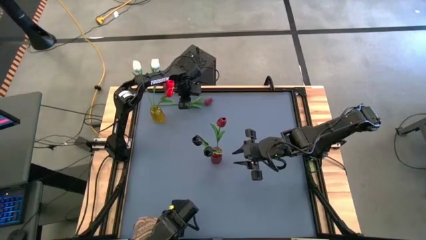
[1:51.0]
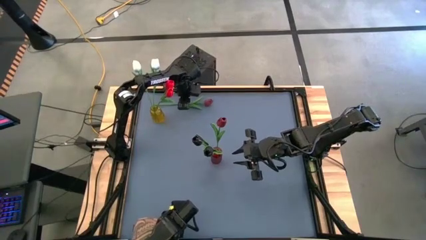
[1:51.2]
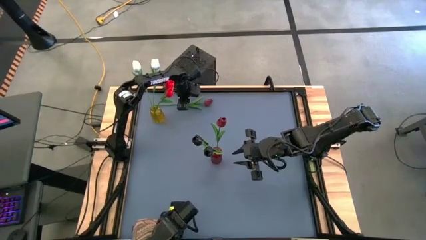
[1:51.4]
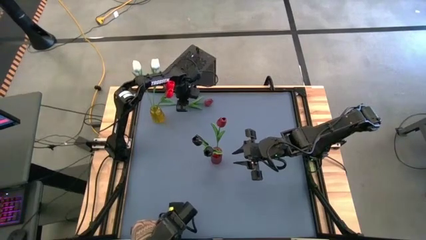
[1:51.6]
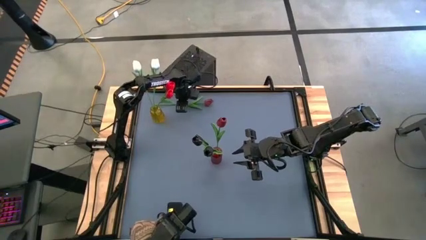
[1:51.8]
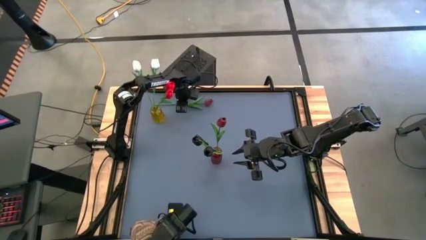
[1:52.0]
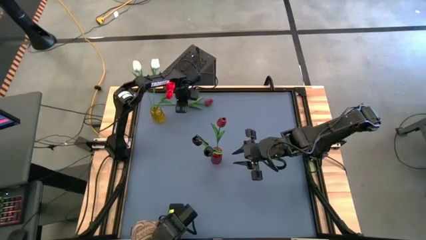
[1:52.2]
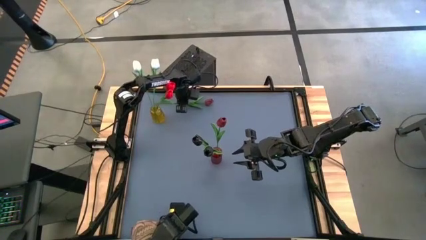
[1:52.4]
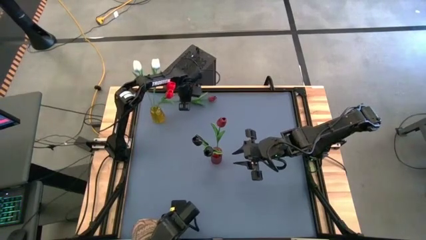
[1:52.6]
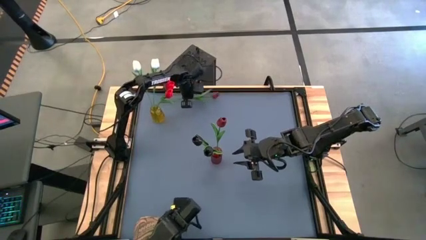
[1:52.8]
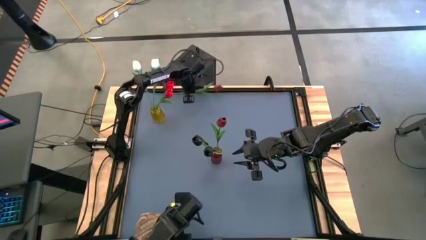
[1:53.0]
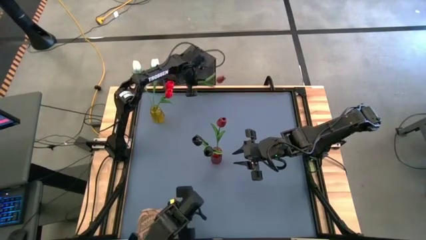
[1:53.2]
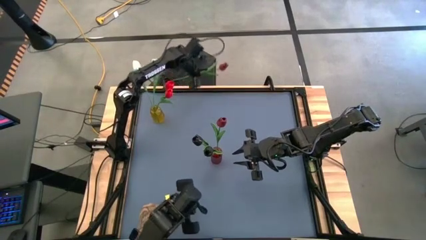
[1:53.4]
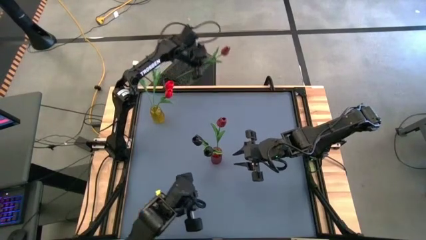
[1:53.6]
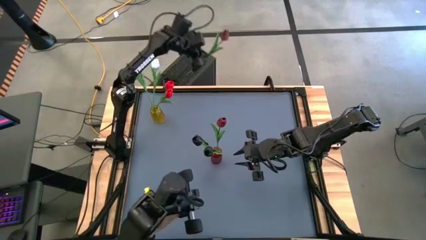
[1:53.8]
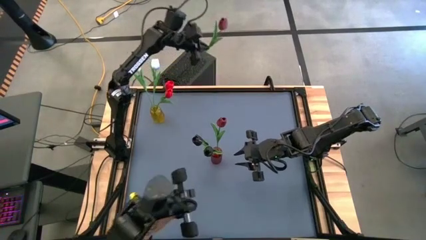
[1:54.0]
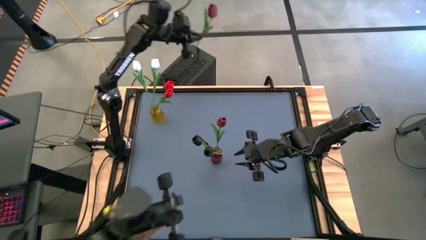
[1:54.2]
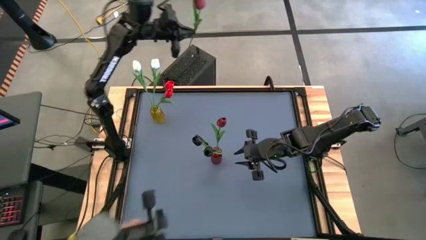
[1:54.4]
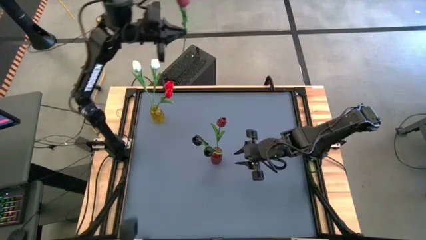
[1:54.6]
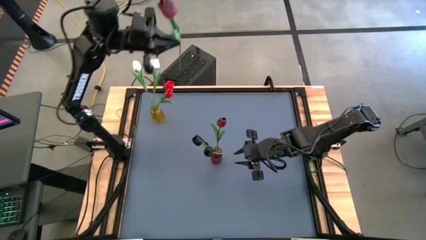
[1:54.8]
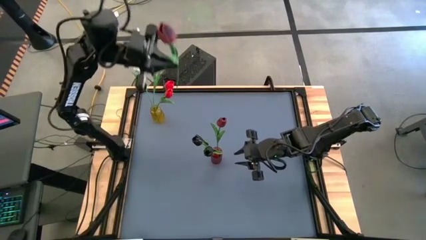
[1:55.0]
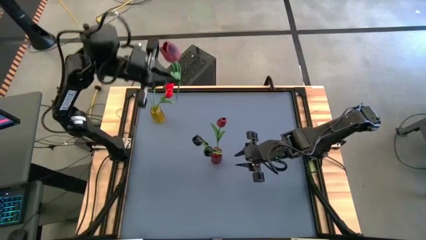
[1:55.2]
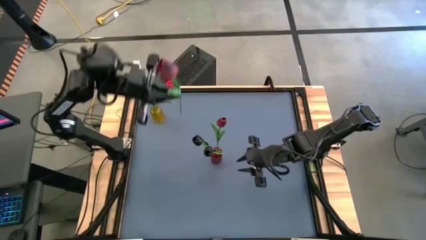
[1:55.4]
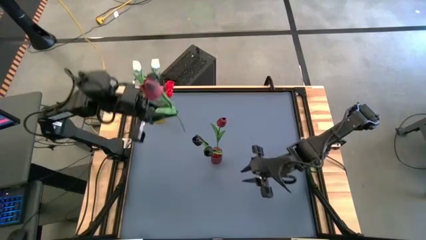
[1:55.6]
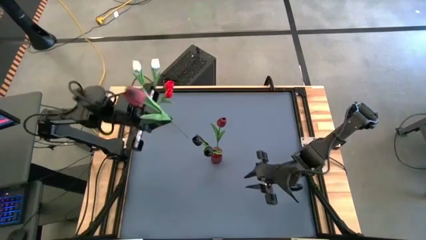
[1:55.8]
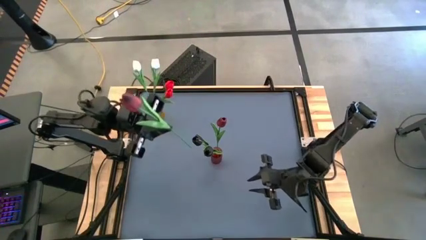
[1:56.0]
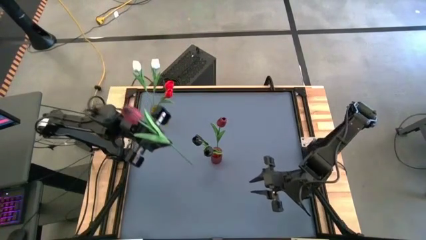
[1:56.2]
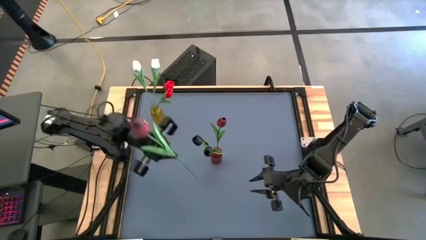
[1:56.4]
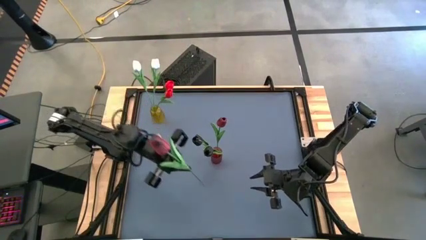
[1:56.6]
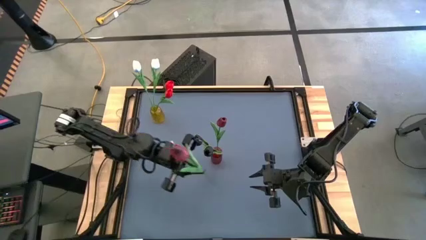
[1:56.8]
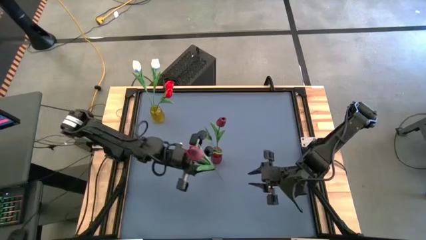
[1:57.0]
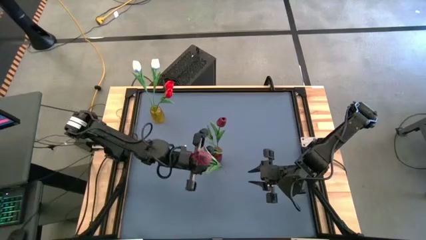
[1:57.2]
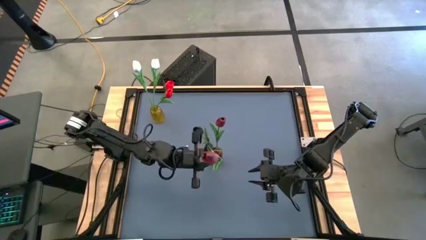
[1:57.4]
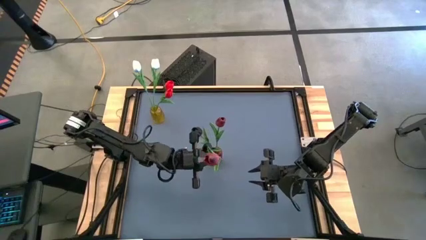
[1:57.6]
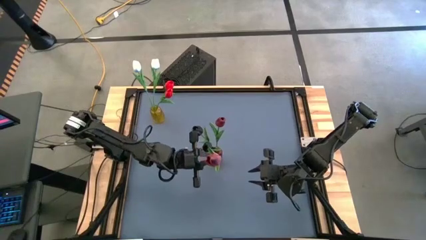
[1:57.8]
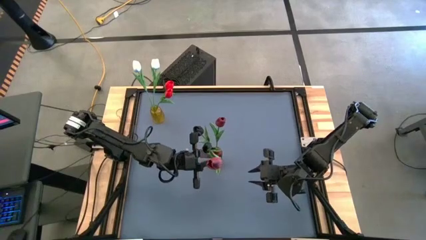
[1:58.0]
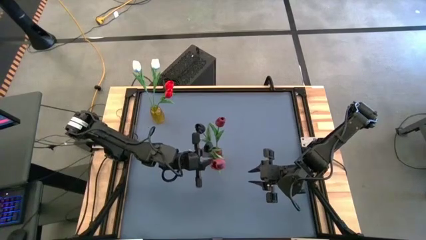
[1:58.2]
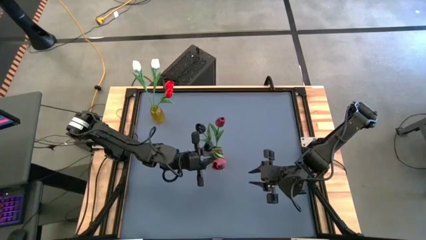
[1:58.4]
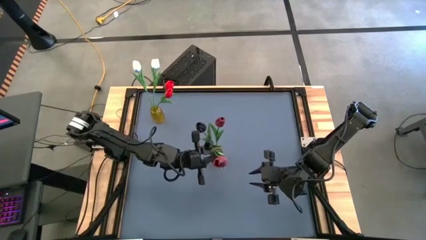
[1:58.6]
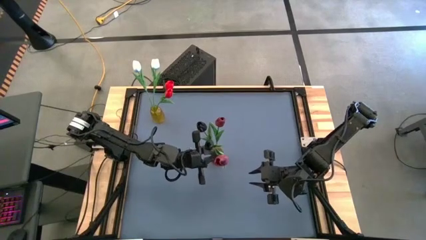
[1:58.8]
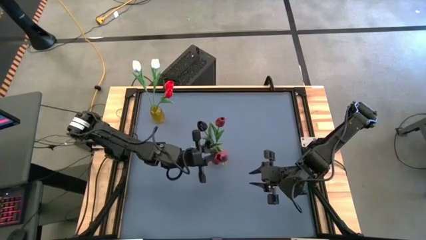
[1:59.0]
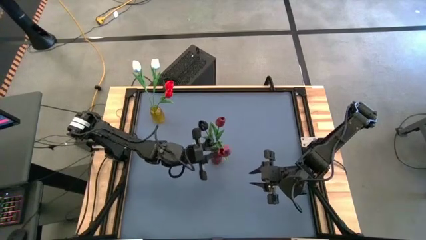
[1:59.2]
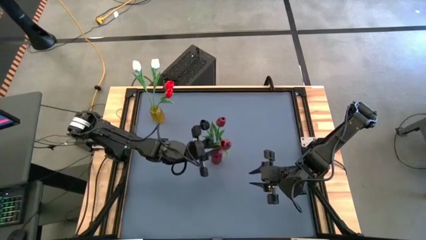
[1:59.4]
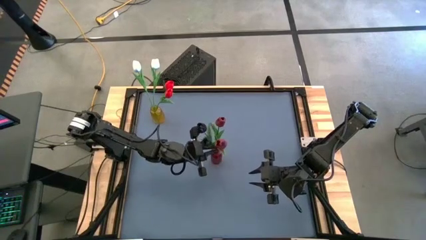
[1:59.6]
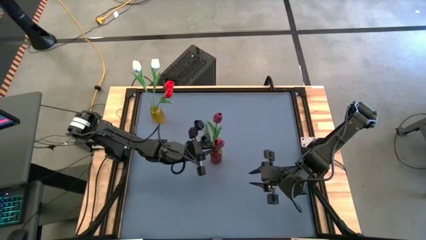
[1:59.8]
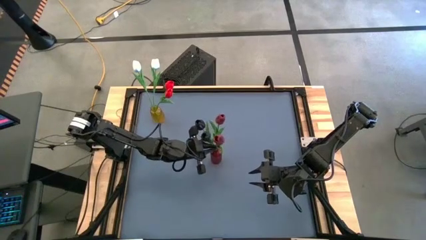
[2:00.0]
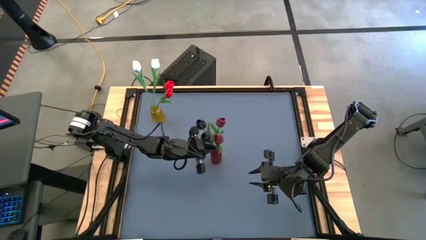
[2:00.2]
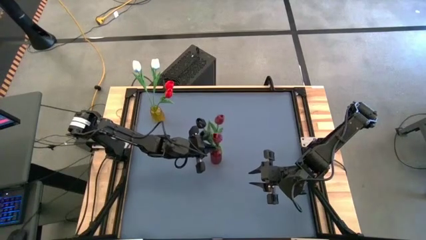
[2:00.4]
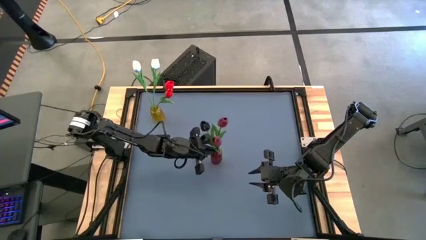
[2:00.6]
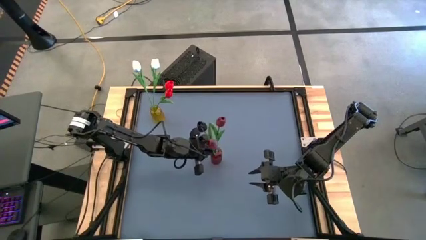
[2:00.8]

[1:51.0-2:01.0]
Task: Sort flowers into vase by color
Put the dark red tulip into the red vase
